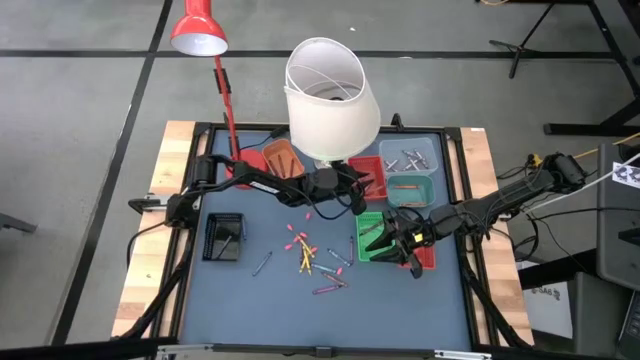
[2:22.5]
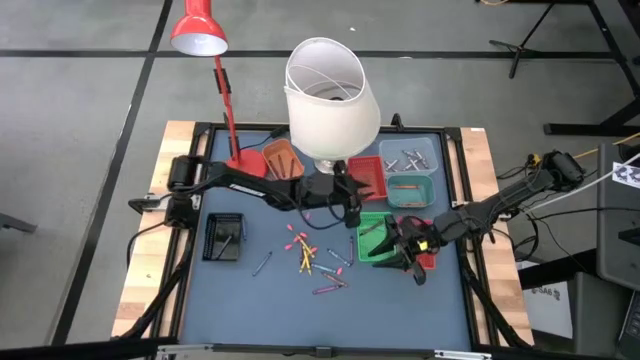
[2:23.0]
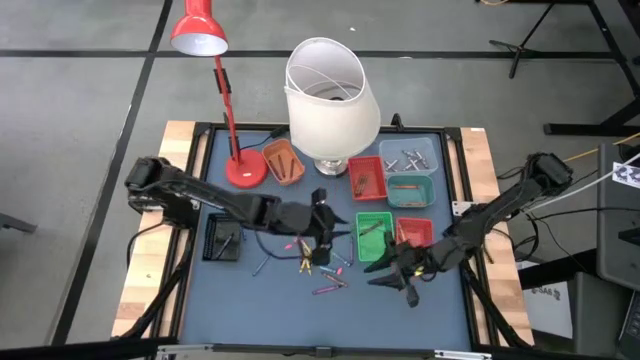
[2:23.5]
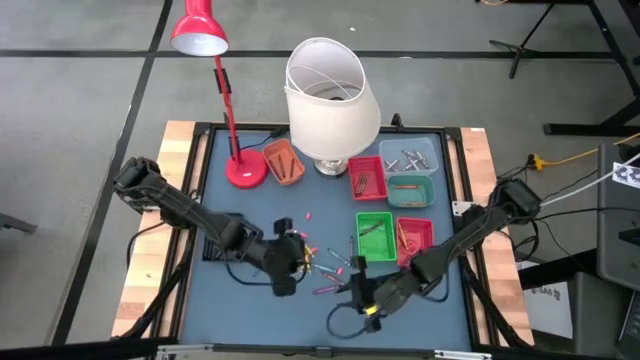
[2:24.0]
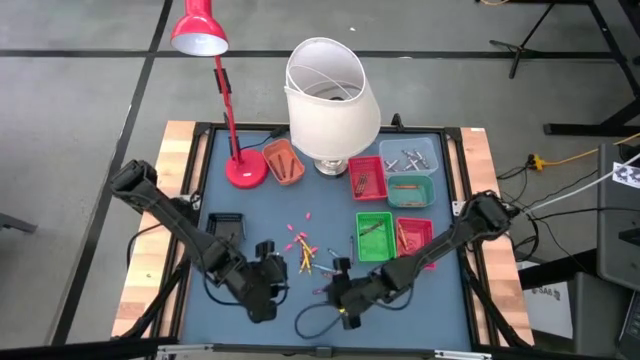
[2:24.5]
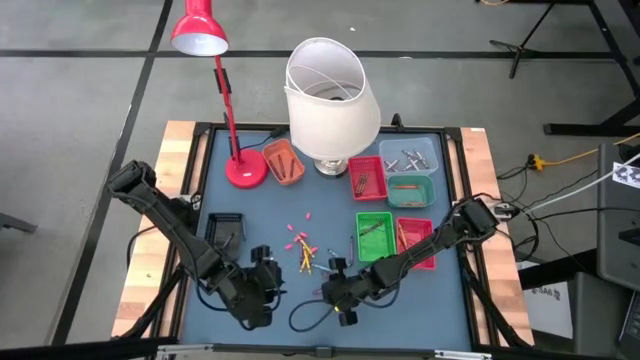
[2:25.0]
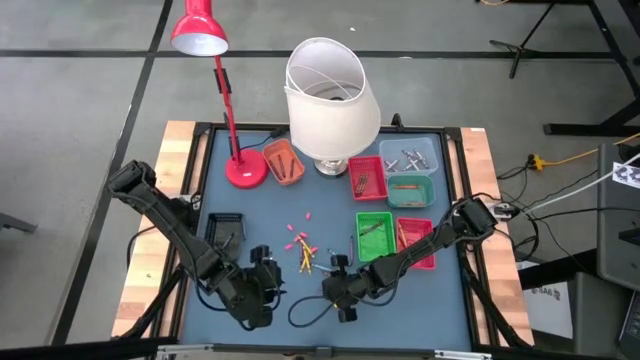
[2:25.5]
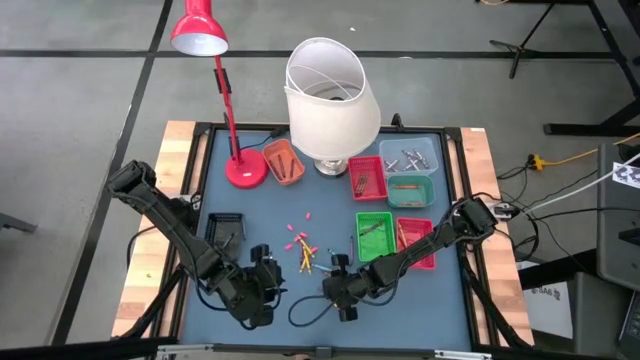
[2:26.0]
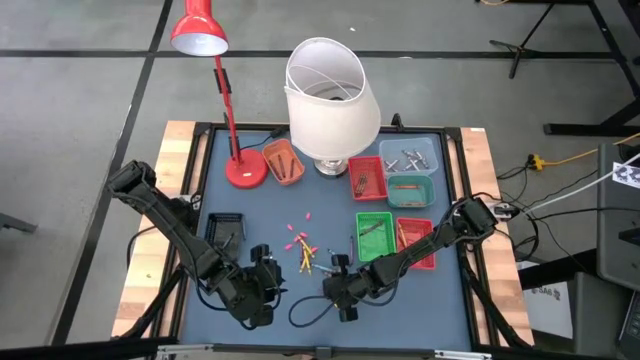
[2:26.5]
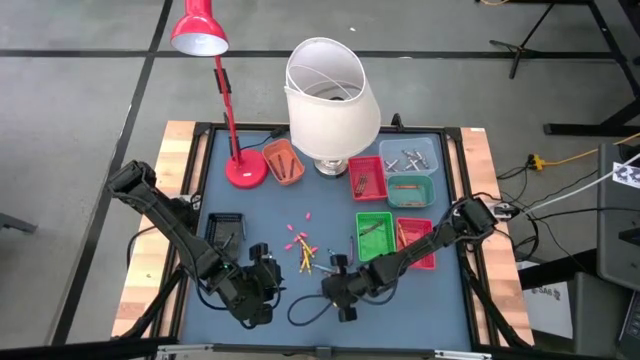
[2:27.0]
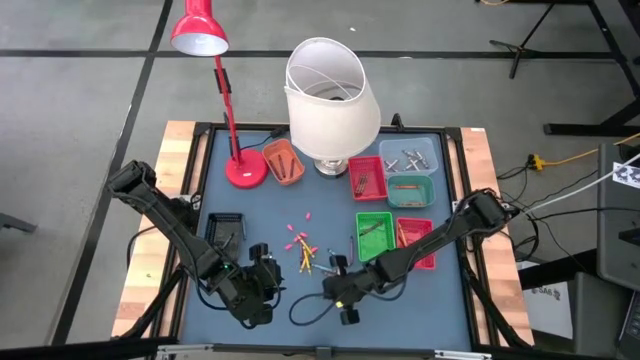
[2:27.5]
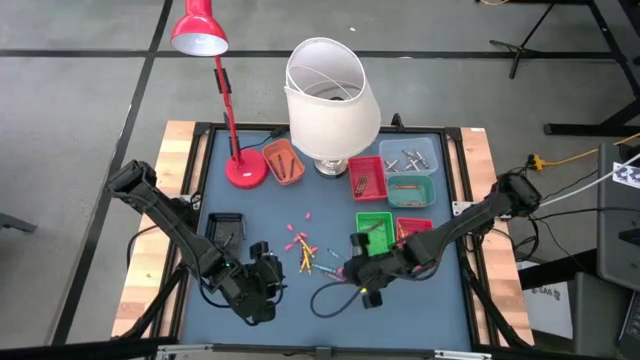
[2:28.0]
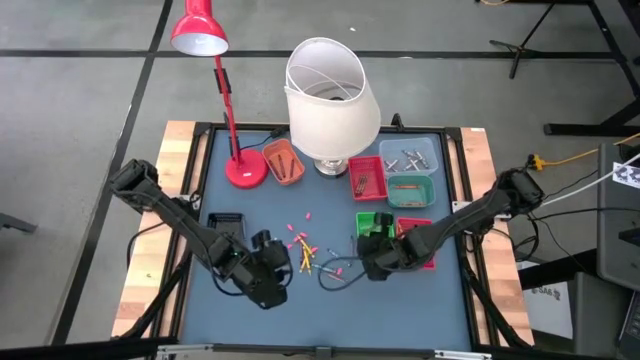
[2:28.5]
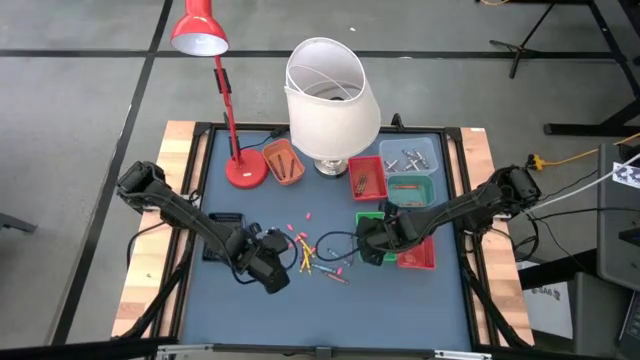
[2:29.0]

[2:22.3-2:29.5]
Task: Sort crayons
Put the violet crayon into the green bin

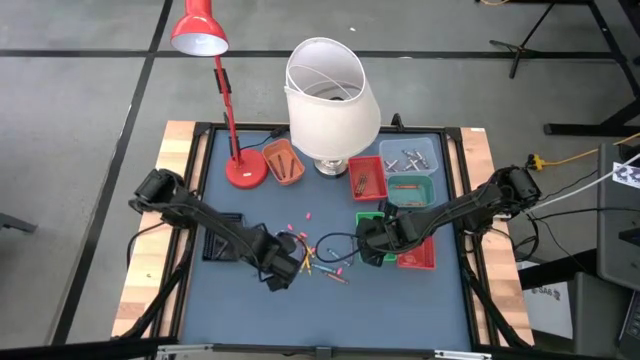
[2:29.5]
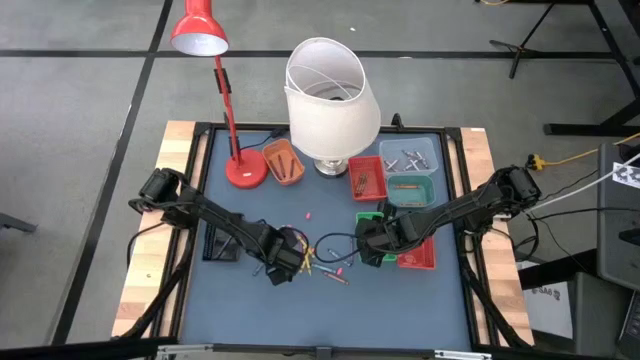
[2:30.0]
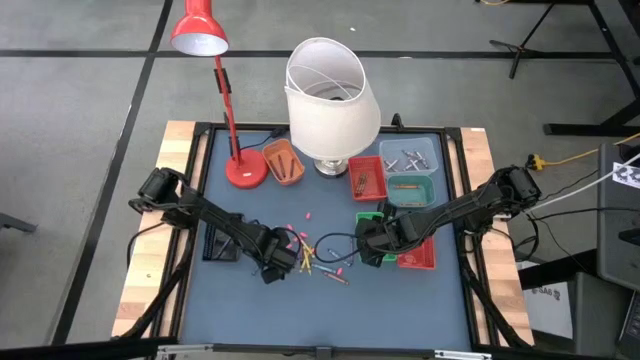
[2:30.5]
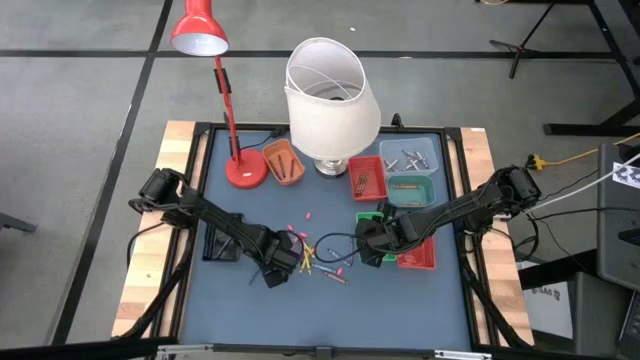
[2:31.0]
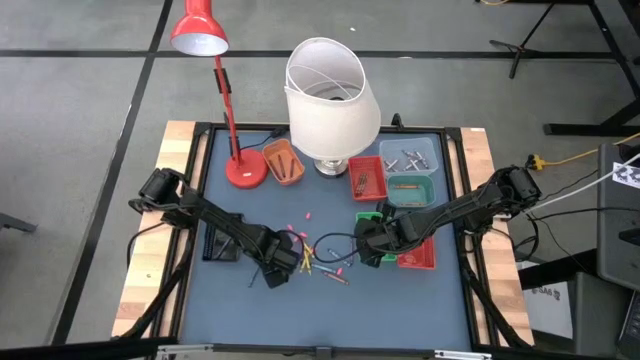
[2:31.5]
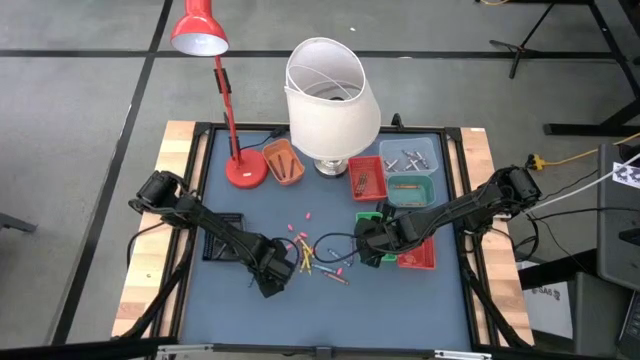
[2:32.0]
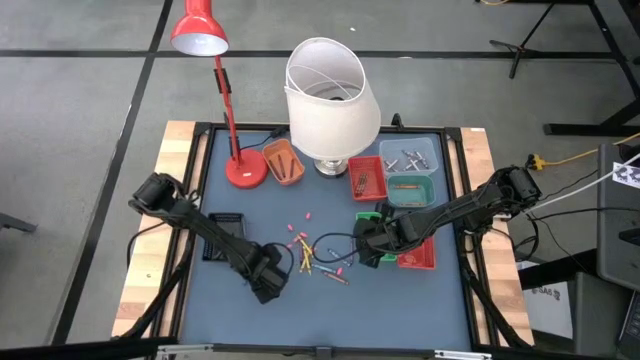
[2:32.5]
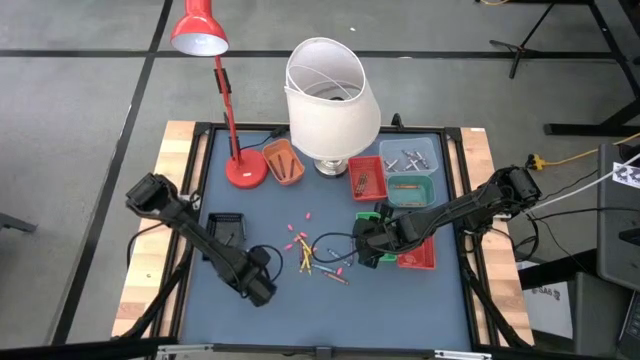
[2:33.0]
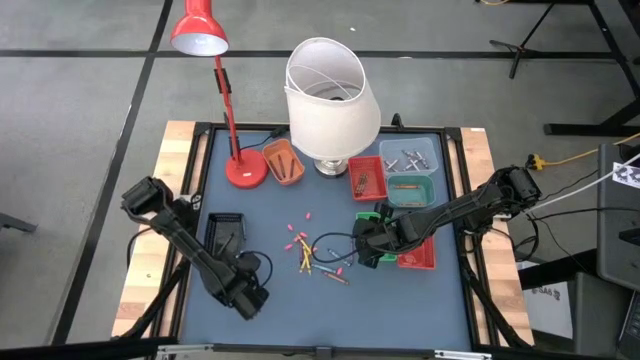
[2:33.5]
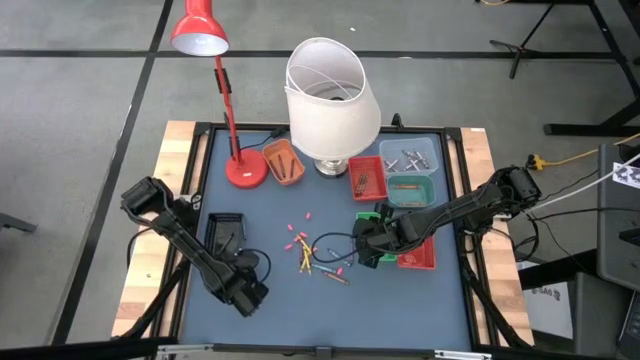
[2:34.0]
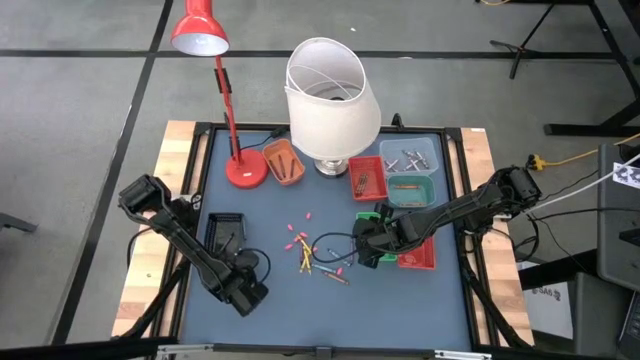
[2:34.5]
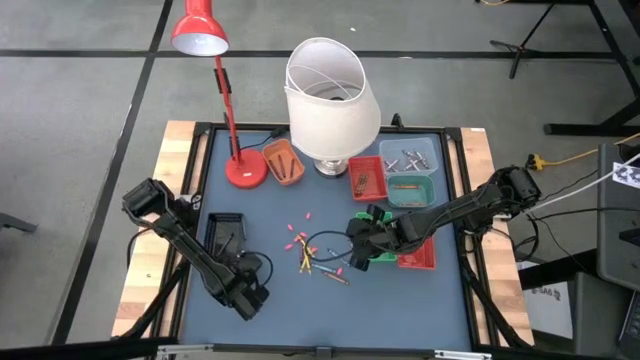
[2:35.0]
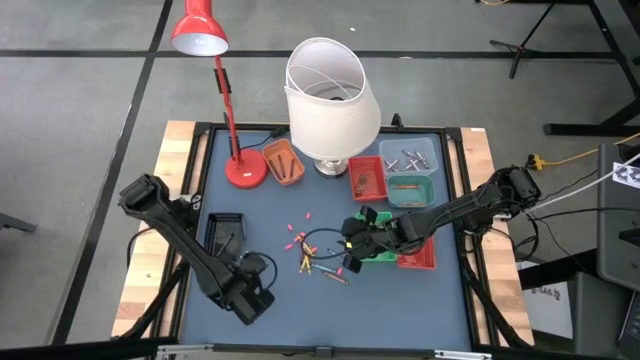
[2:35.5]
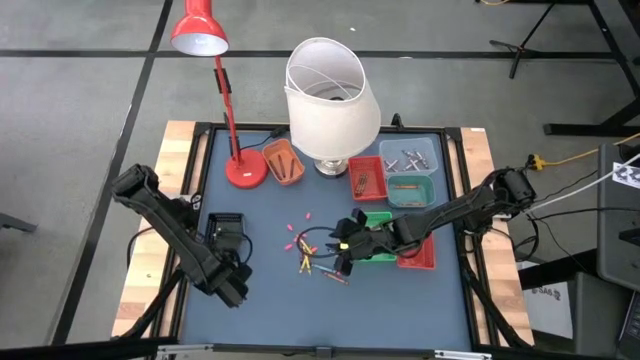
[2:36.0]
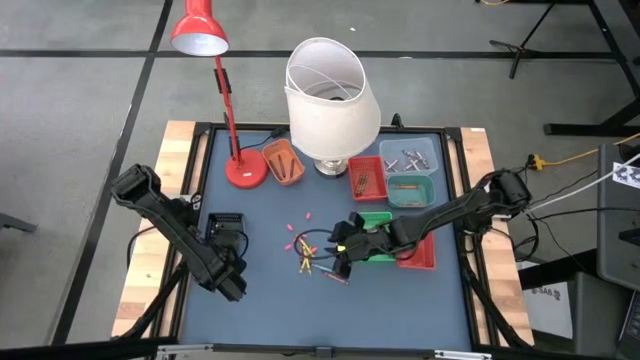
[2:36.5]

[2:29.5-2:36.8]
Put the blue crayon into the black bin

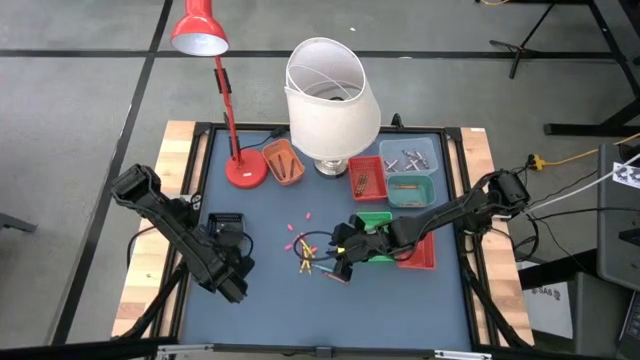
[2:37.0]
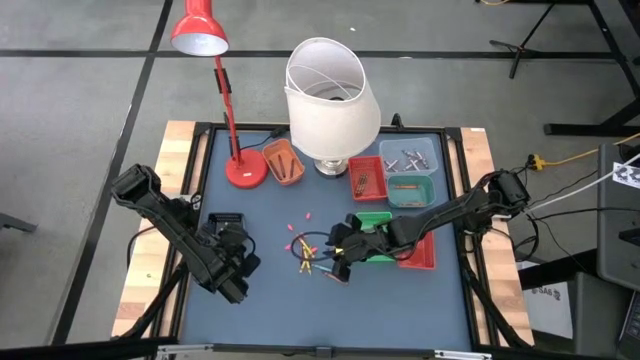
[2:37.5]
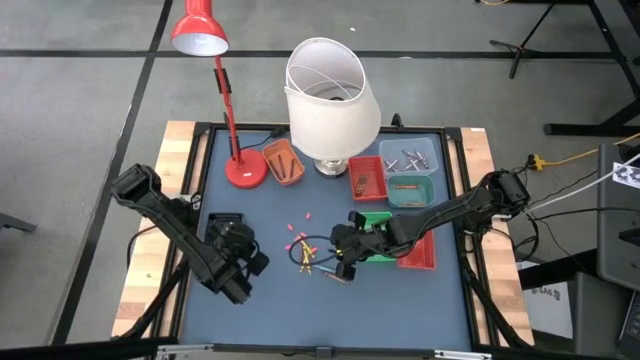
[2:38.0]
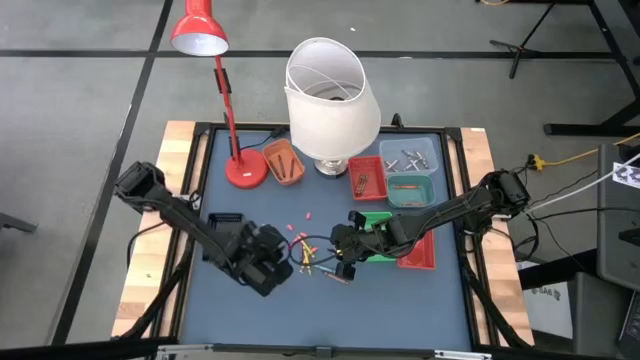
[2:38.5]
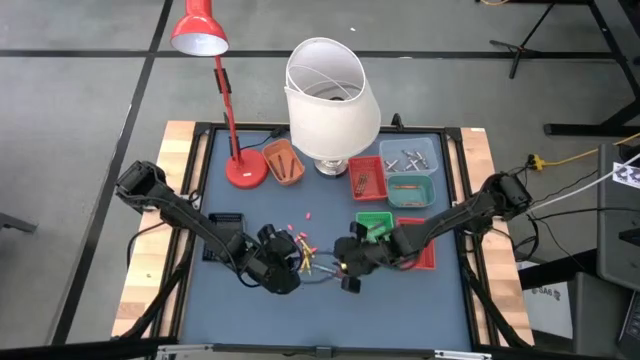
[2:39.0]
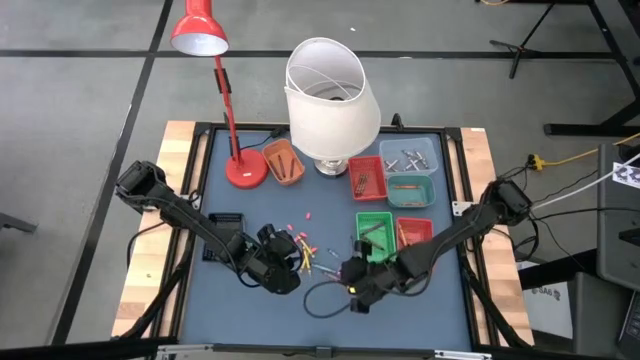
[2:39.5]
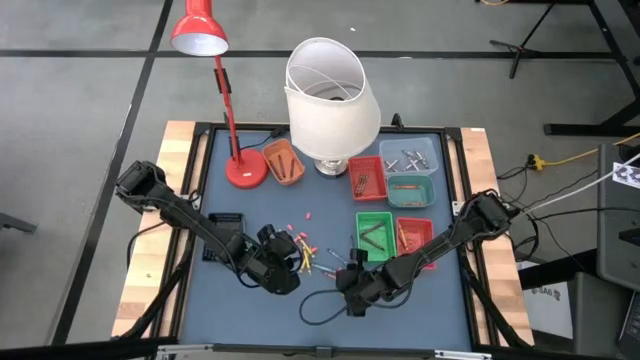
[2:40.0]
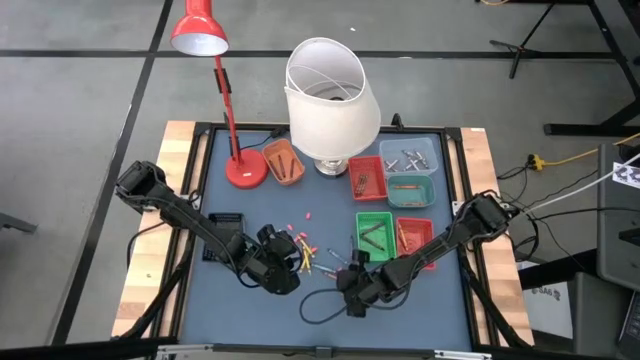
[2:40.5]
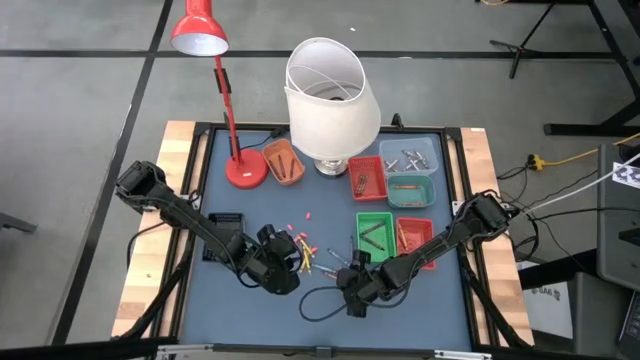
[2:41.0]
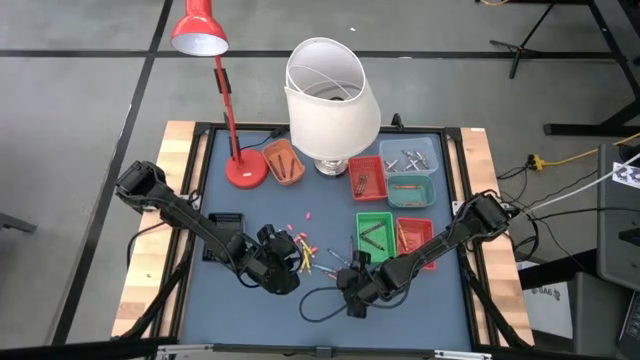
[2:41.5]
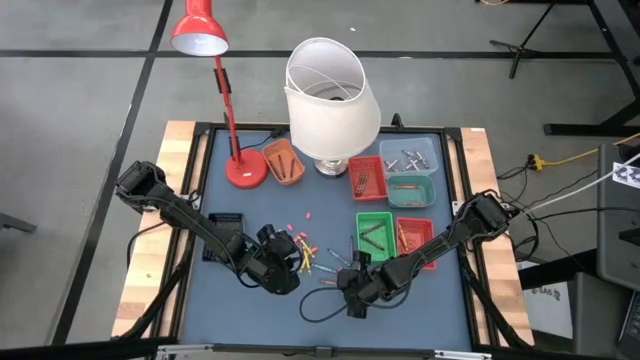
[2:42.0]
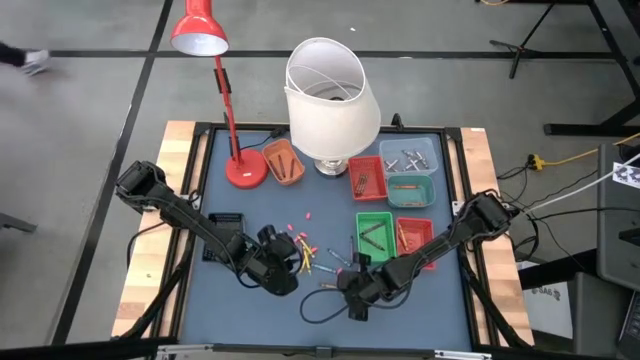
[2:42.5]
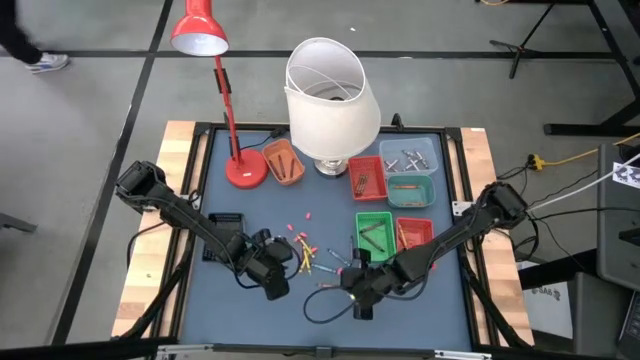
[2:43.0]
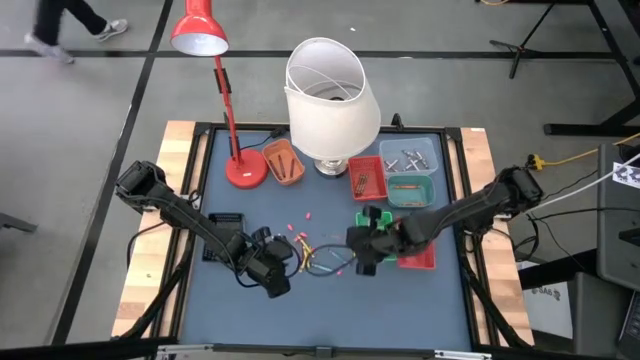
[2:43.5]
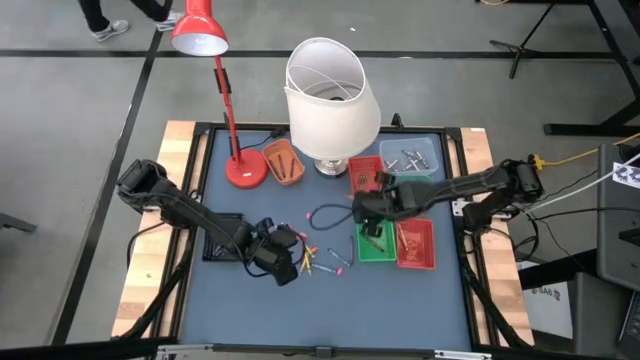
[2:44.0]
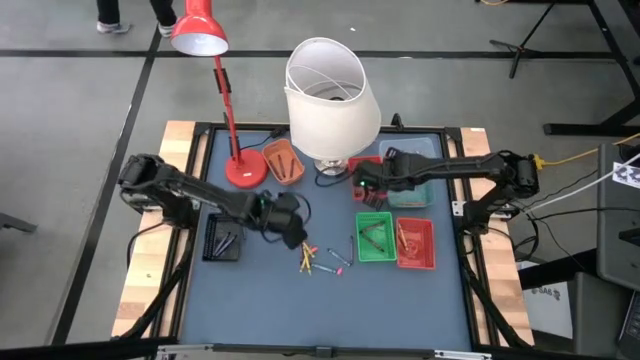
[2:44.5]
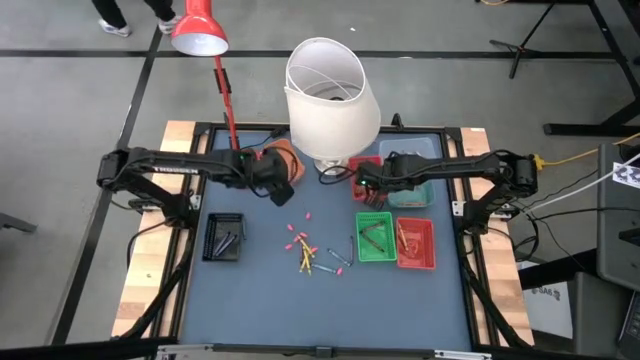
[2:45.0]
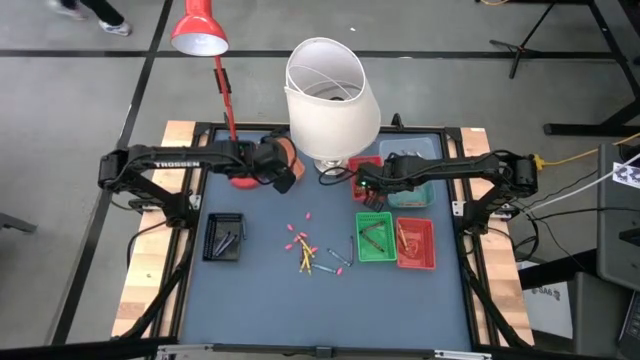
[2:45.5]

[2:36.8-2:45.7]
Put the brown crayon into the top dark orange bin
